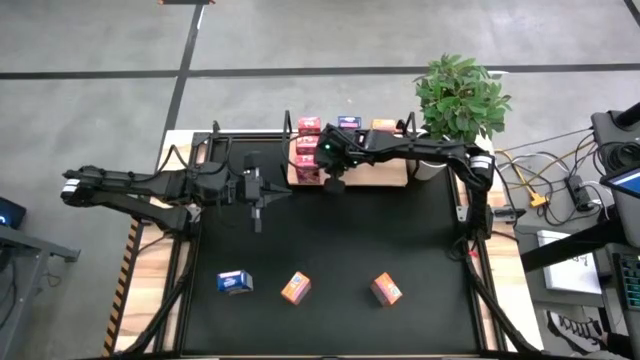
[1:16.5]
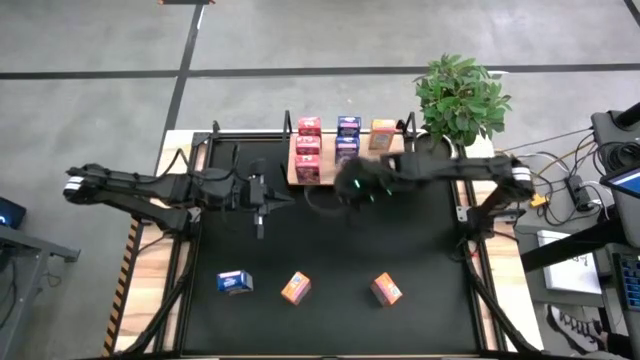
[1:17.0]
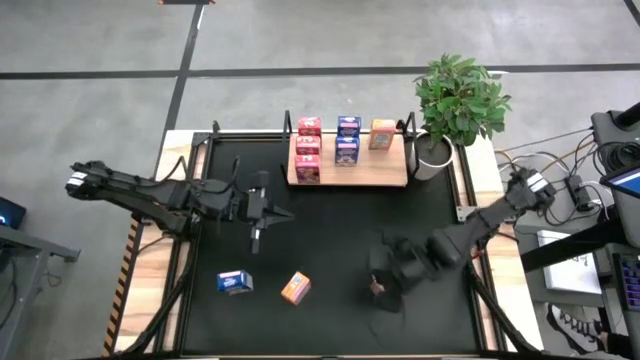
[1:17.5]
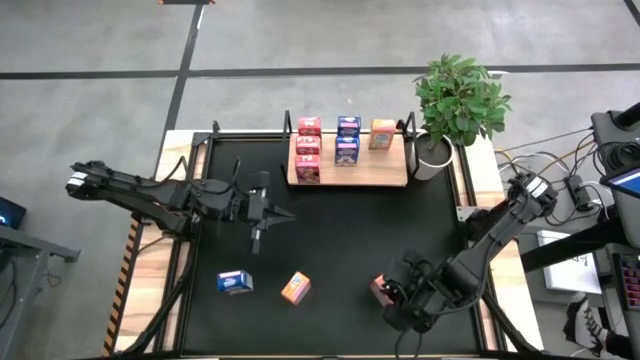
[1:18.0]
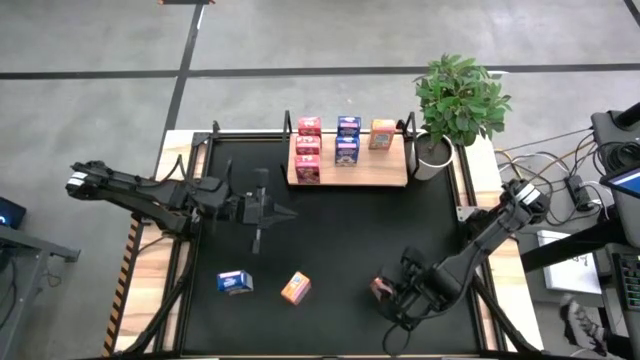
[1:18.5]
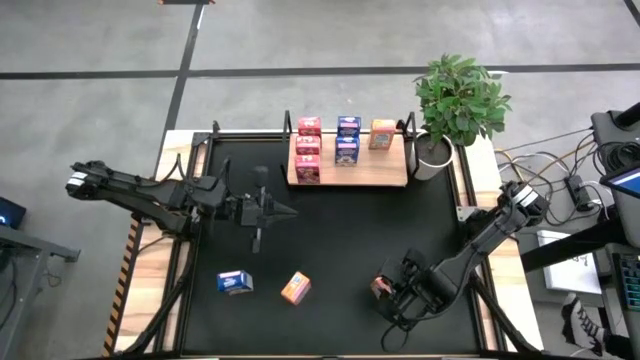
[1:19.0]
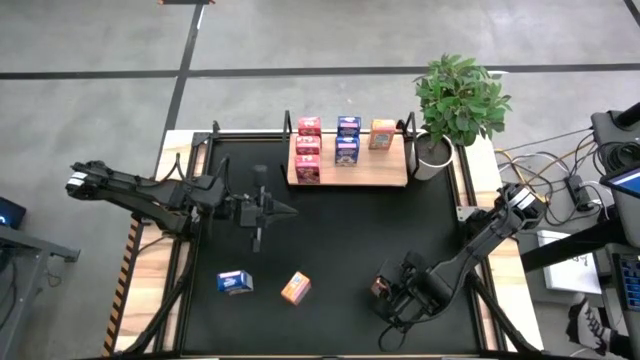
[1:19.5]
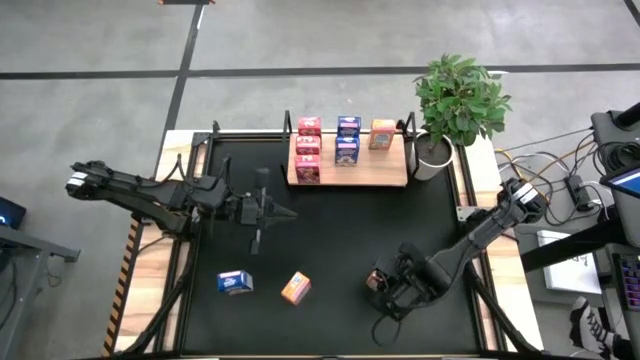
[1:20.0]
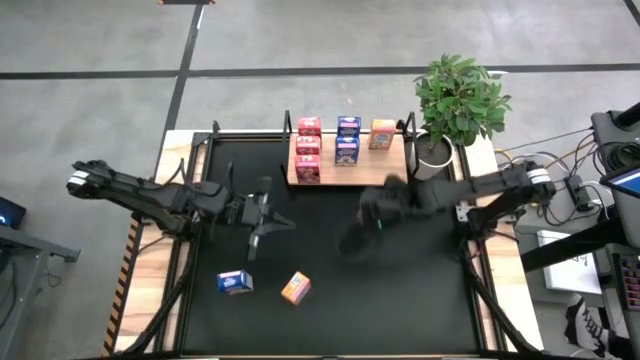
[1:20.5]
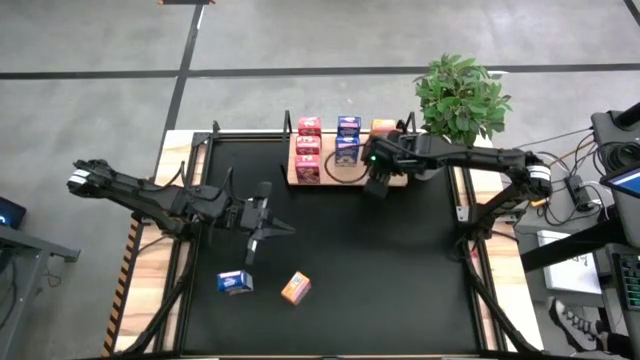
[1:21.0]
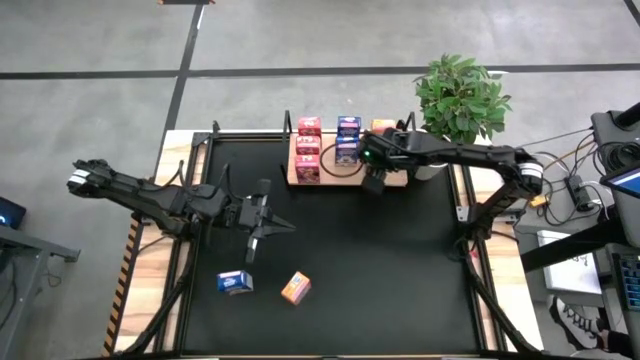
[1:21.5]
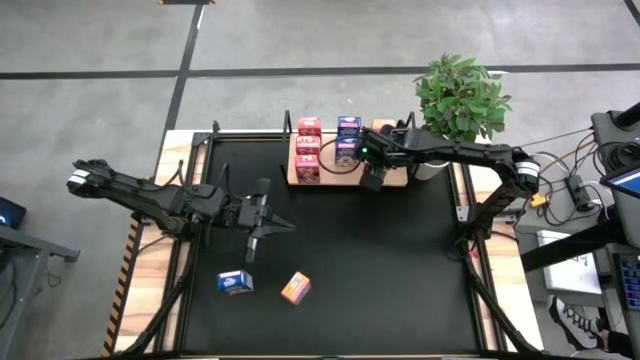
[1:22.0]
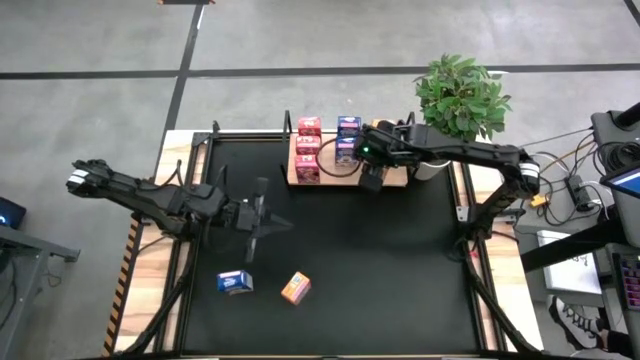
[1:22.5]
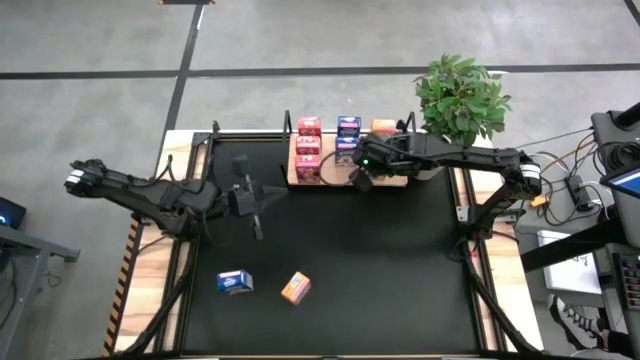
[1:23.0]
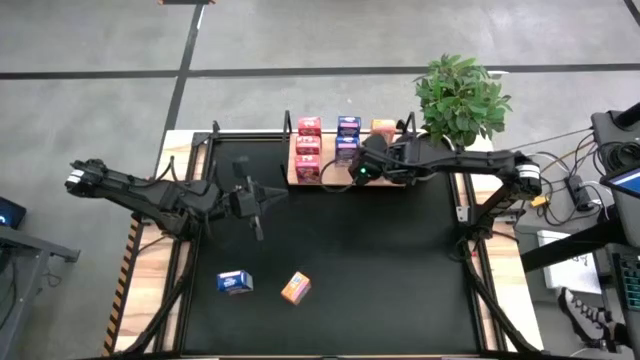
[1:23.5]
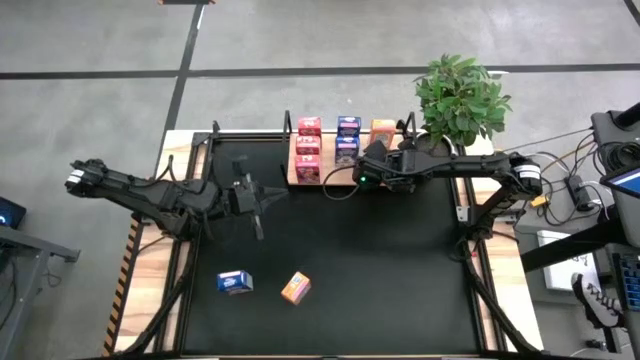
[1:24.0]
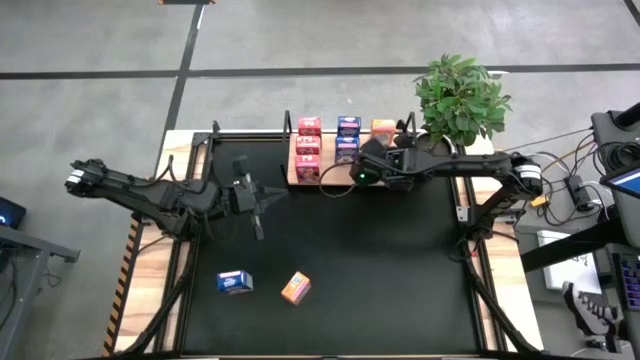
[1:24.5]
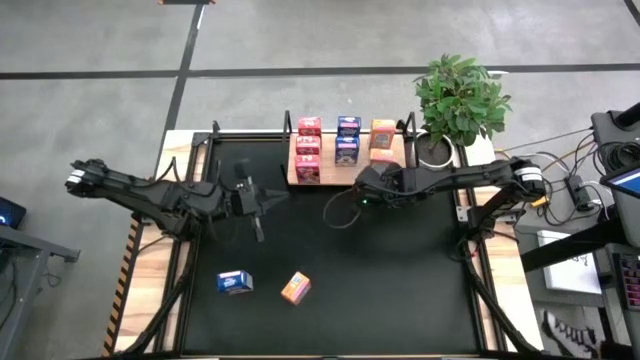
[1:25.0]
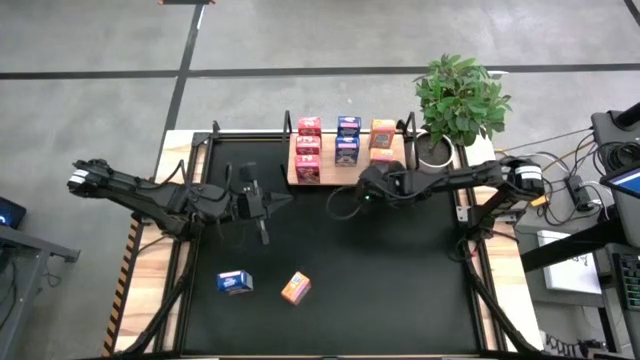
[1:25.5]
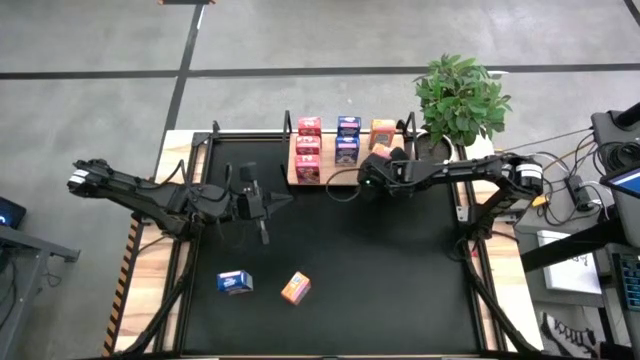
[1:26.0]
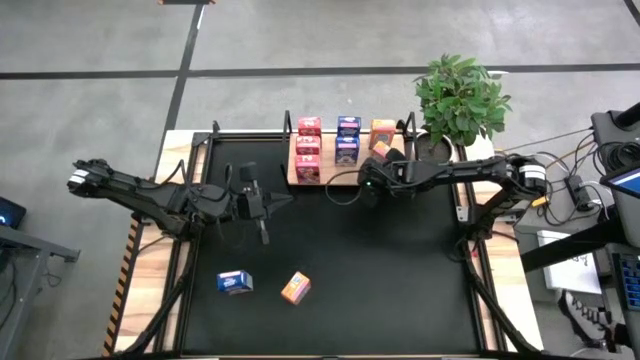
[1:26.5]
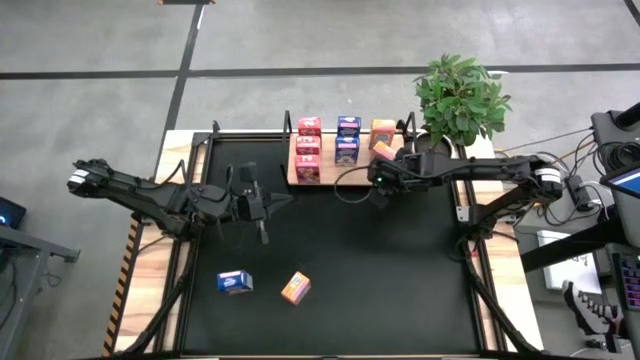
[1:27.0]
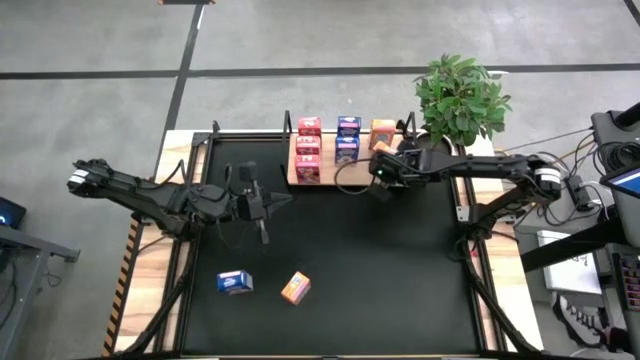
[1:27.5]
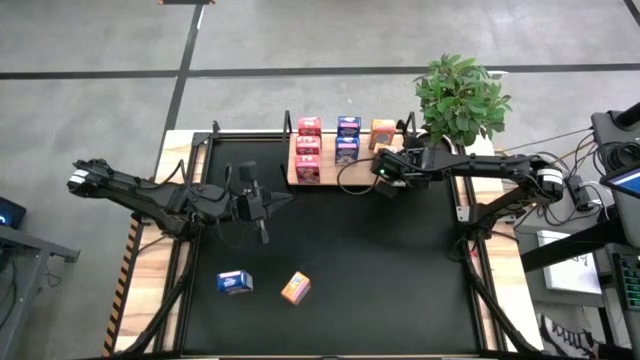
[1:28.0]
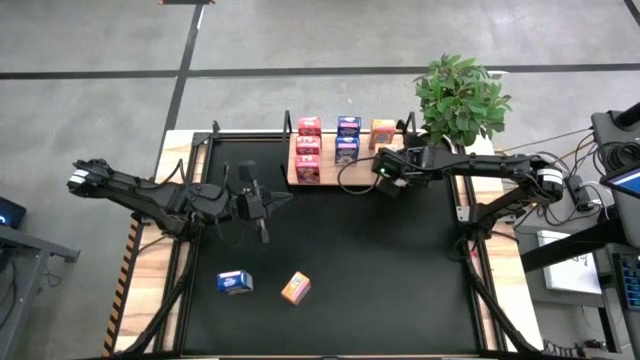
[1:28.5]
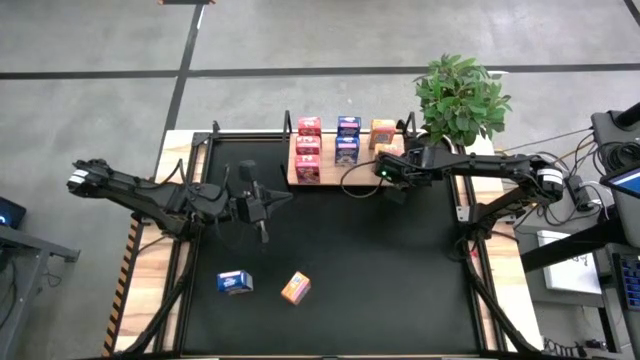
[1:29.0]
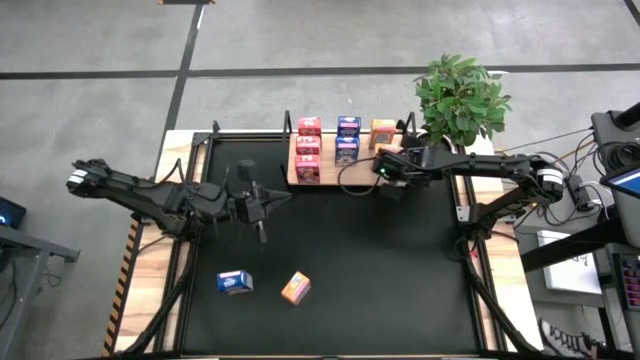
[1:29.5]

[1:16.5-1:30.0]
Task: Stack cereal on shelf
Put the right orange cereal box aligned with the other orange cereal box on the shelf

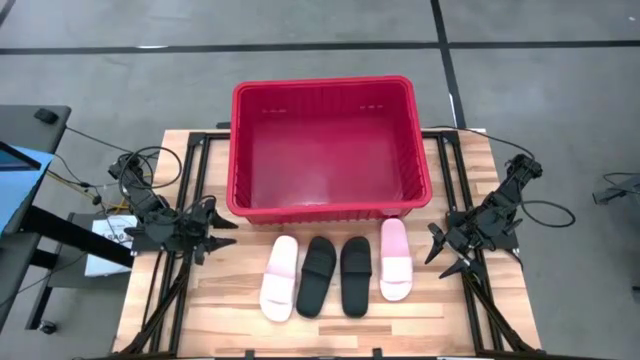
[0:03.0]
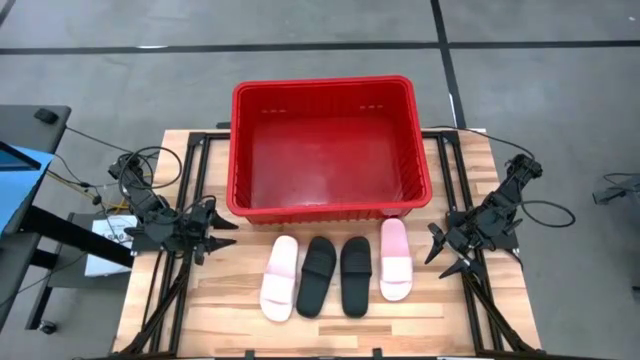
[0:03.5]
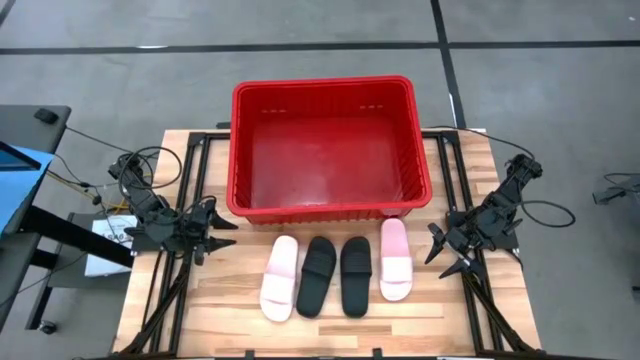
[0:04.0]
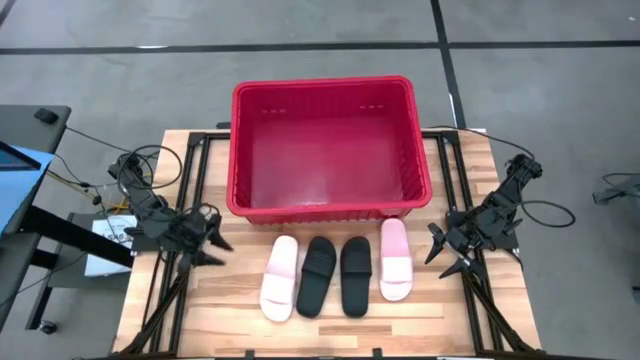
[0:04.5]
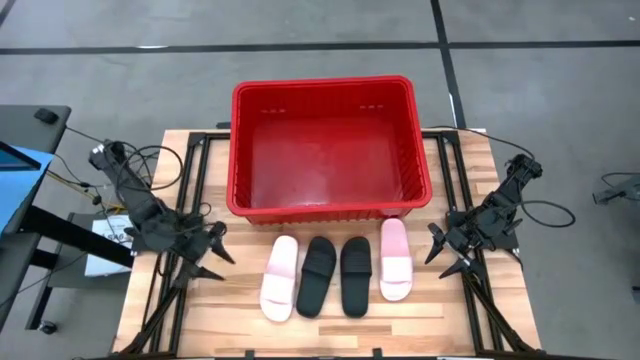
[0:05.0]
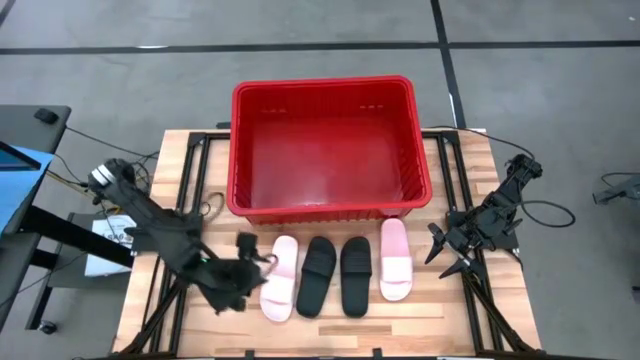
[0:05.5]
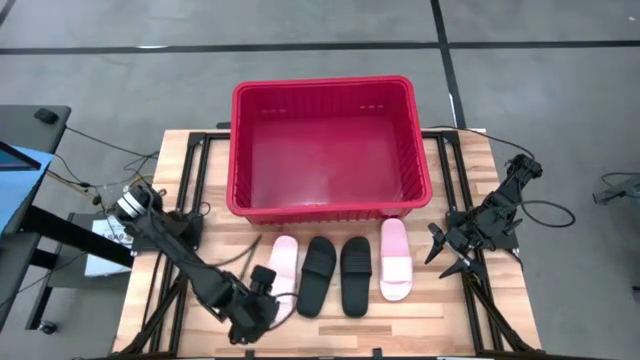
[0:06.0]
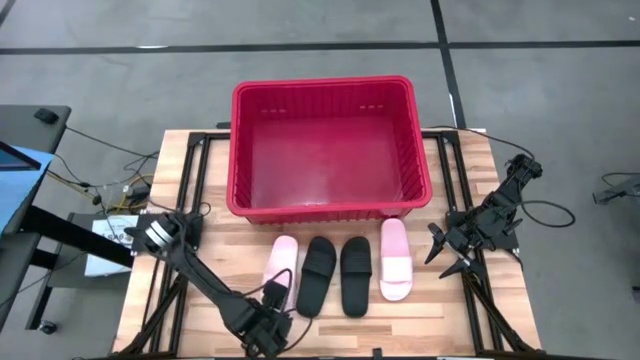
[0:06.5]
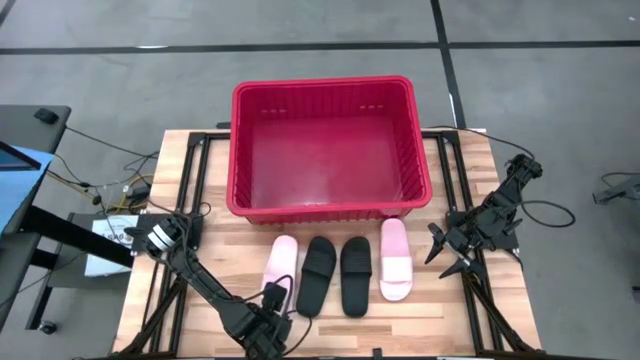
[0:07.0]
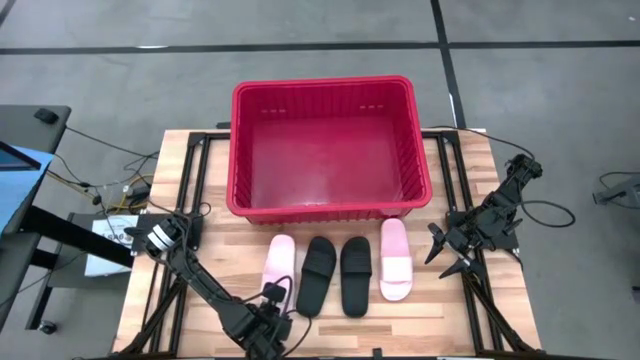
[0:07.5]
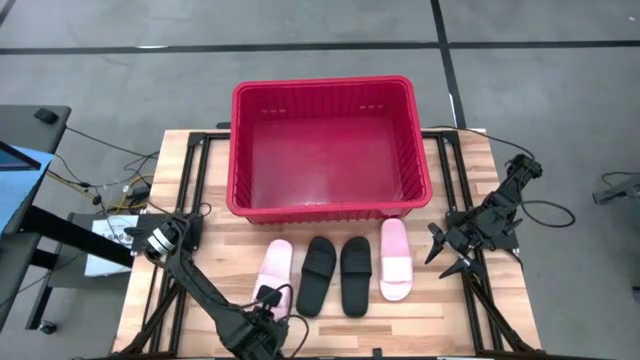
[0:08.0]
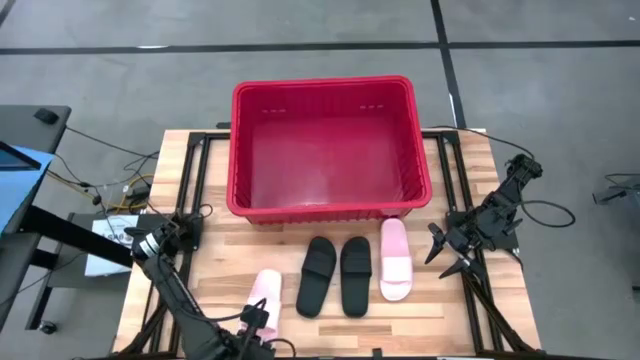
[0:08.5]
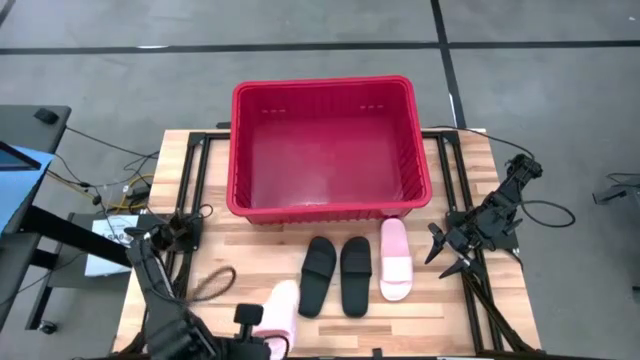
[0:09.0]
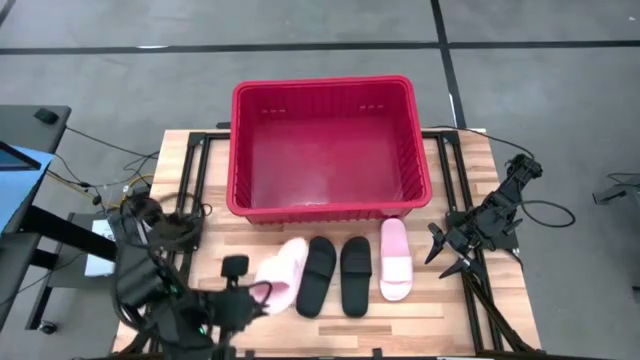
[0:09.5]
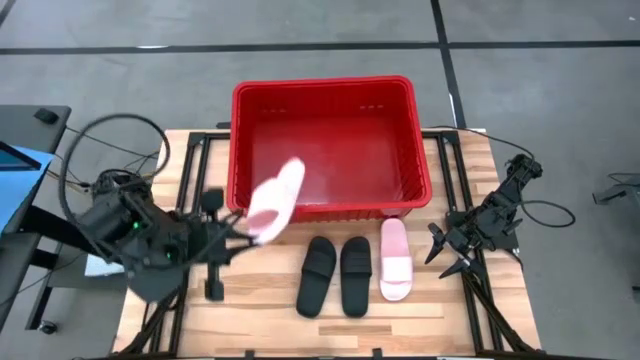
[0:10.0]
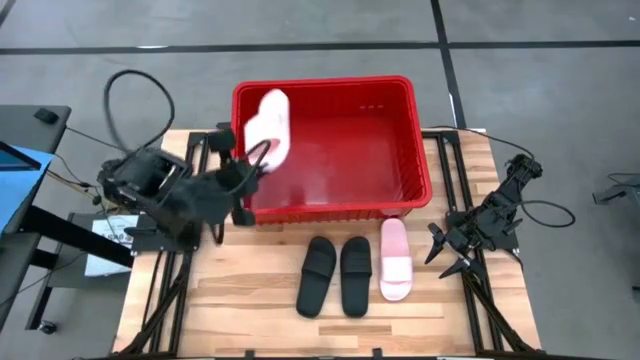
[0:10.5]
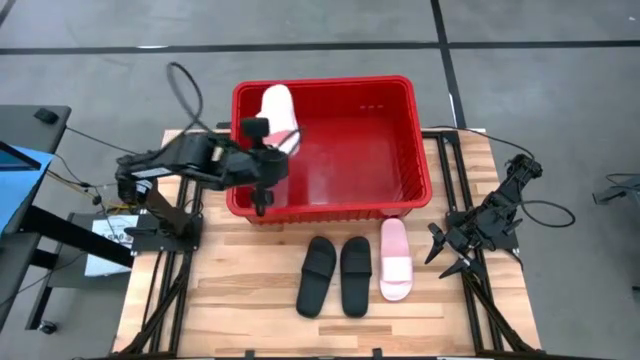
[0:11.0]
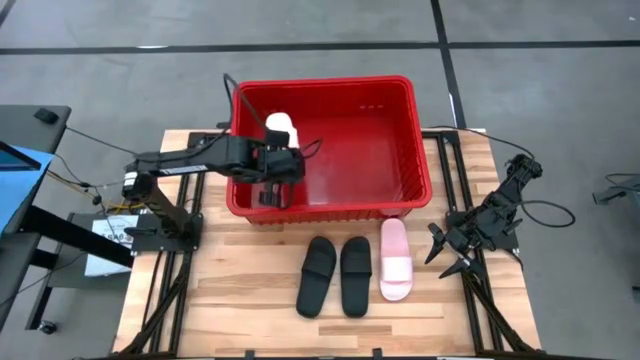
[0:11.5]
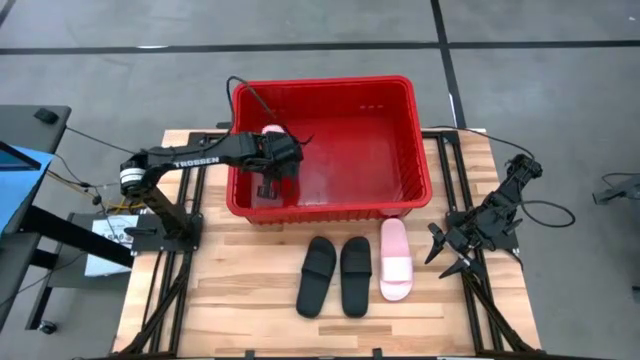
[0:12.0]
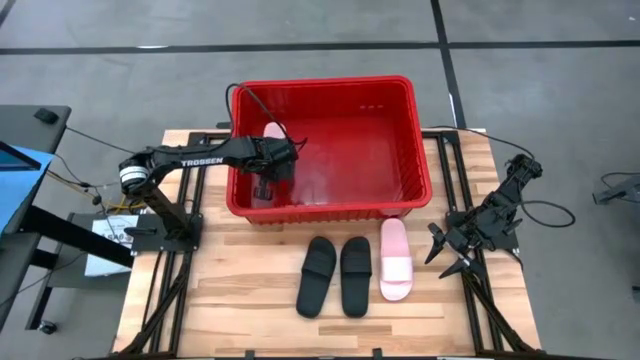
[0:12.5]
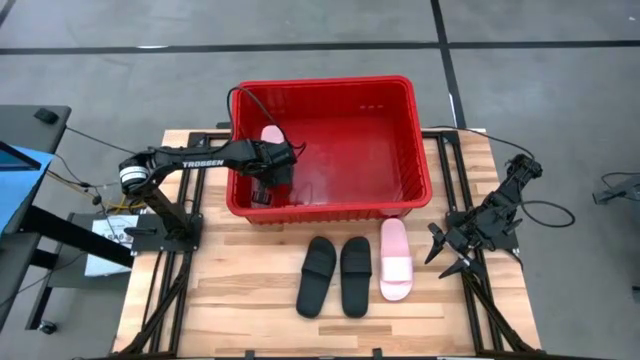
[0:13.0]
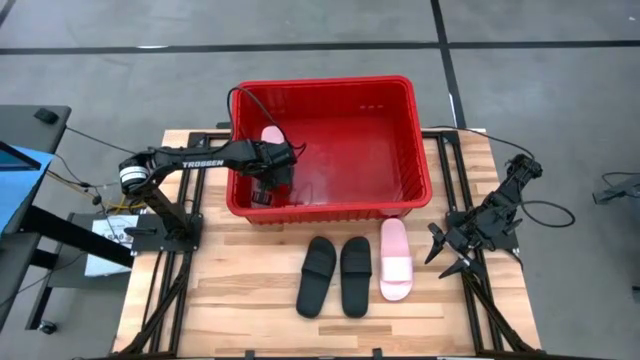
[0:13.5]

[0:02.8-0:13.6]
Task: Pick and place slides into bin
Put the left pink slipper in the red bin
